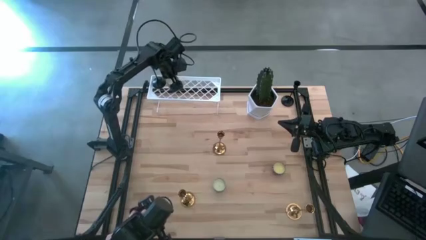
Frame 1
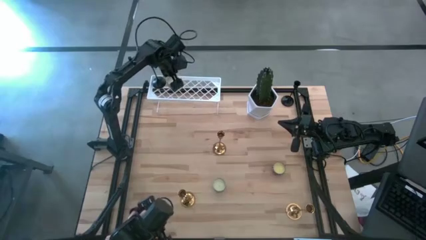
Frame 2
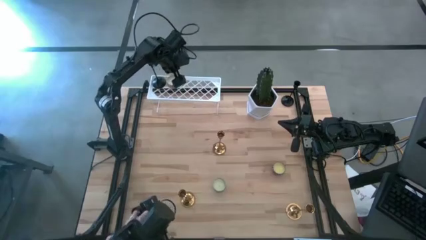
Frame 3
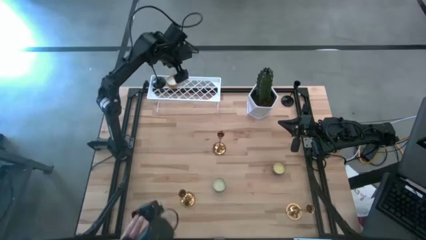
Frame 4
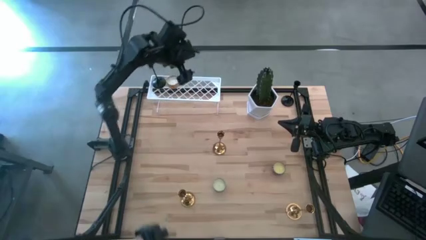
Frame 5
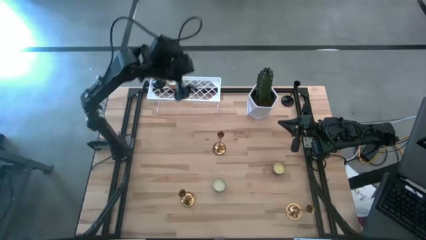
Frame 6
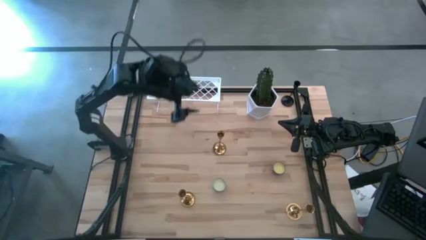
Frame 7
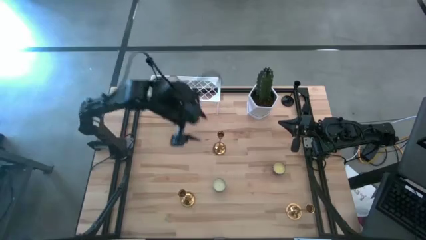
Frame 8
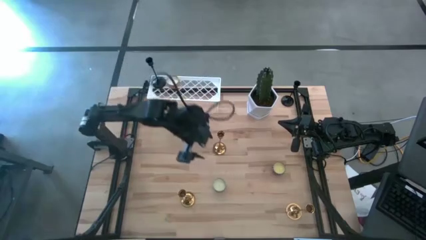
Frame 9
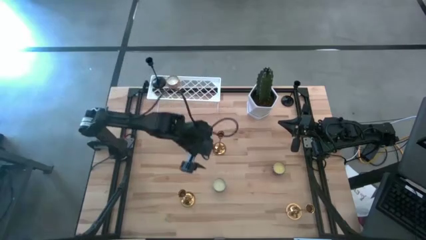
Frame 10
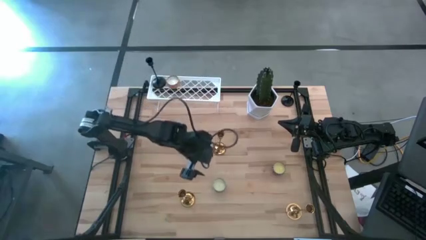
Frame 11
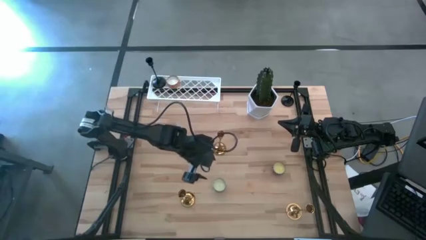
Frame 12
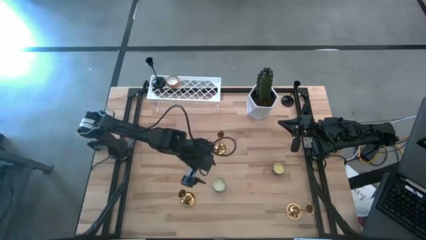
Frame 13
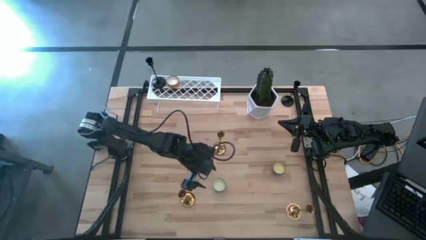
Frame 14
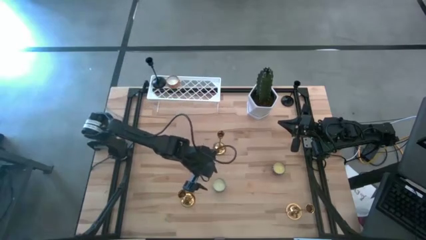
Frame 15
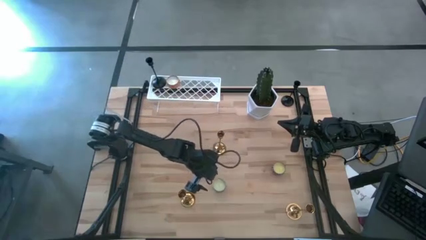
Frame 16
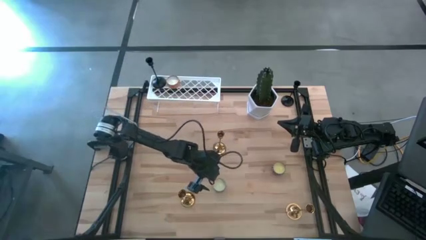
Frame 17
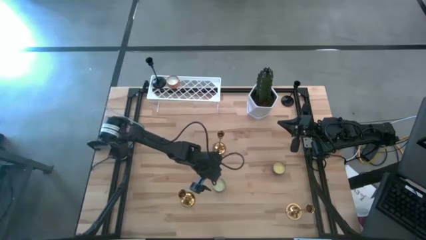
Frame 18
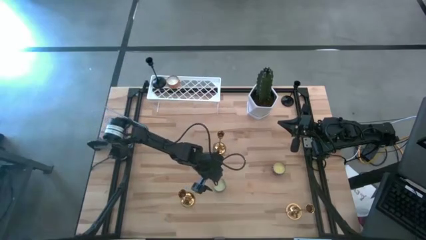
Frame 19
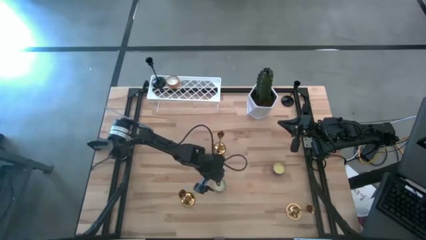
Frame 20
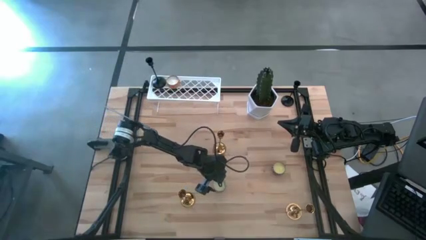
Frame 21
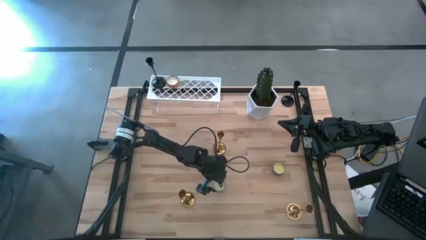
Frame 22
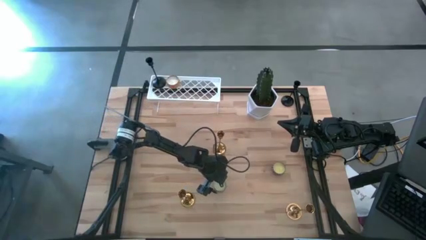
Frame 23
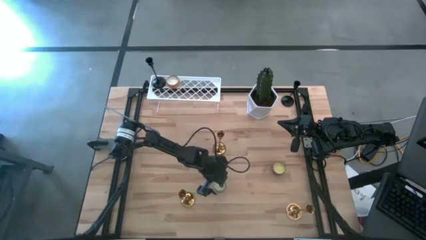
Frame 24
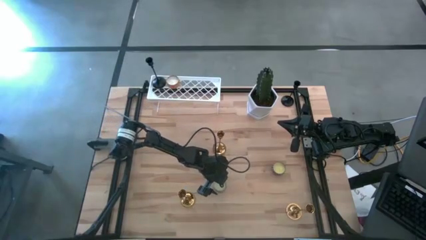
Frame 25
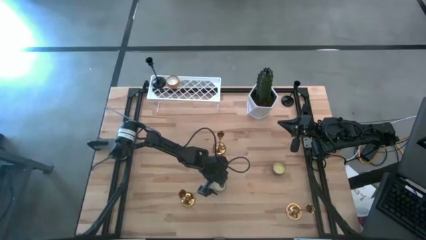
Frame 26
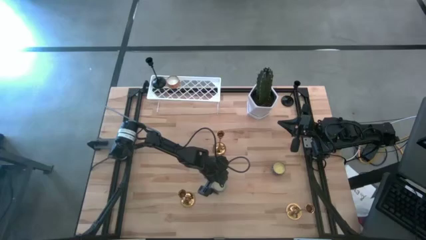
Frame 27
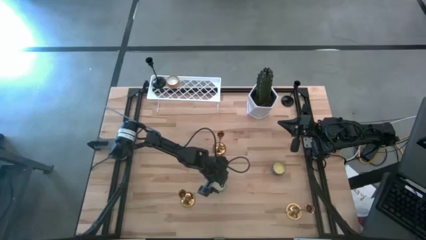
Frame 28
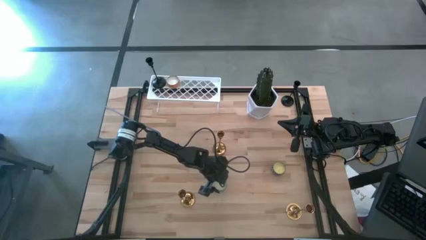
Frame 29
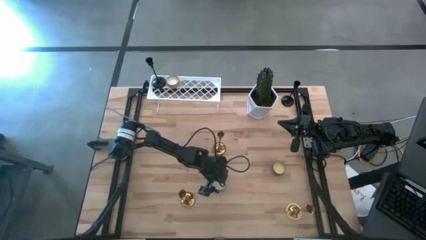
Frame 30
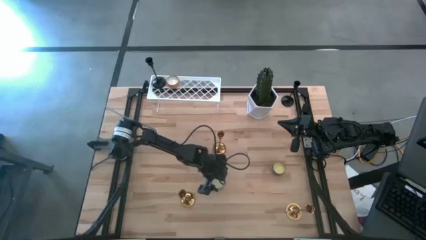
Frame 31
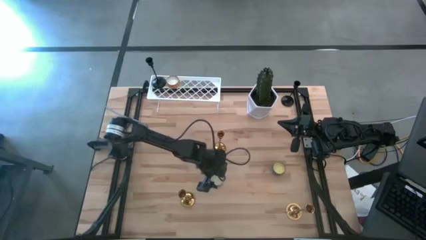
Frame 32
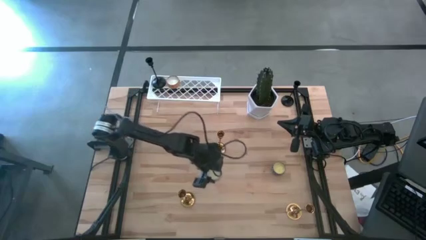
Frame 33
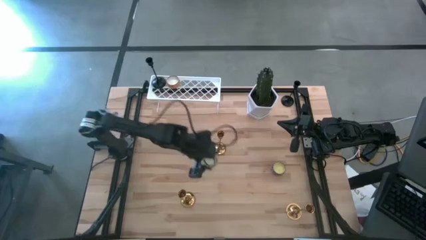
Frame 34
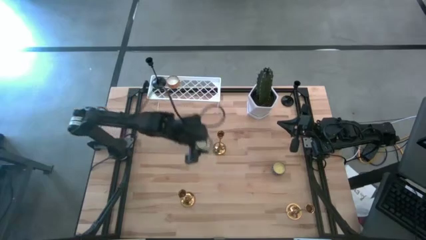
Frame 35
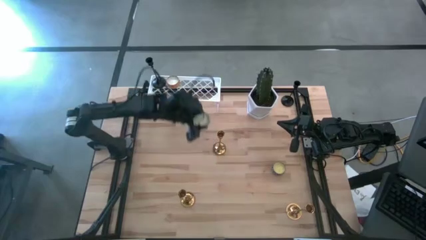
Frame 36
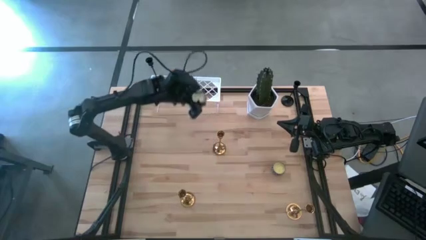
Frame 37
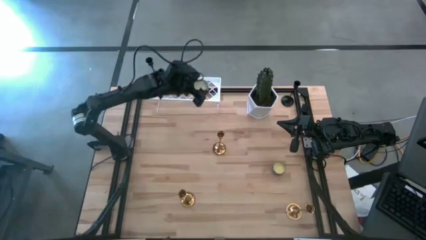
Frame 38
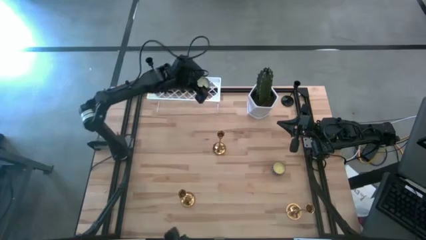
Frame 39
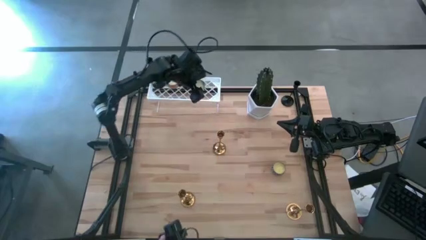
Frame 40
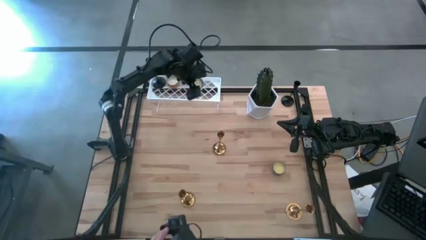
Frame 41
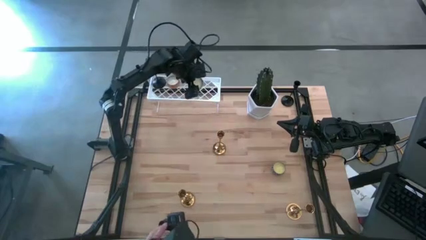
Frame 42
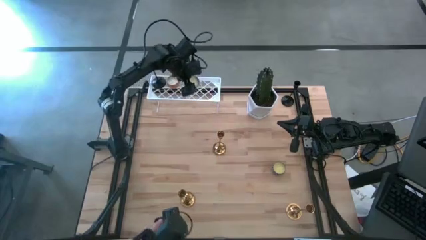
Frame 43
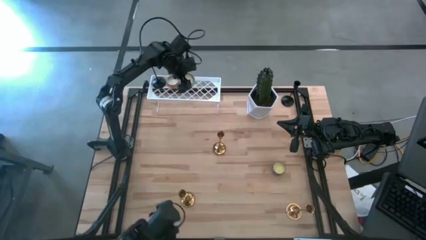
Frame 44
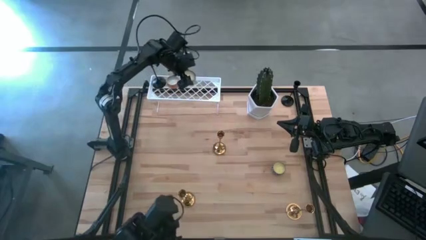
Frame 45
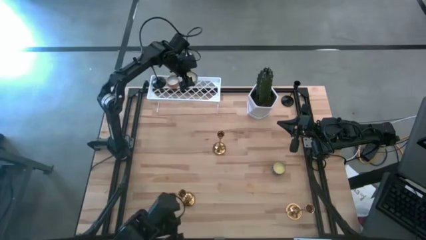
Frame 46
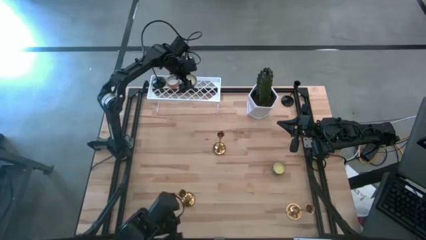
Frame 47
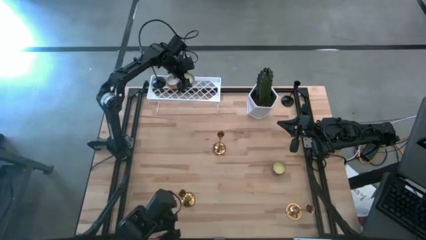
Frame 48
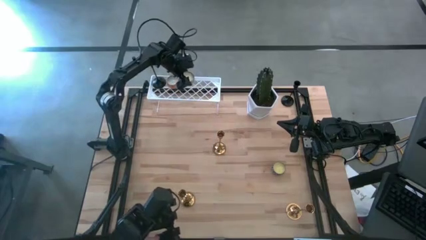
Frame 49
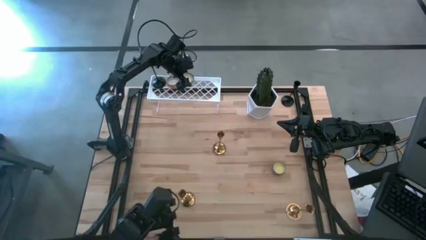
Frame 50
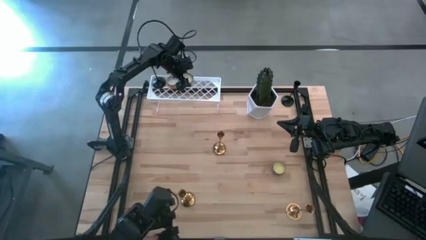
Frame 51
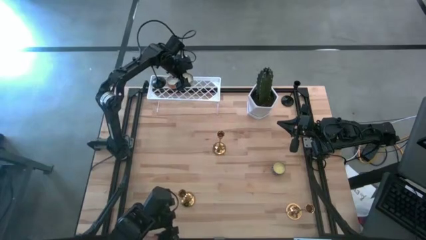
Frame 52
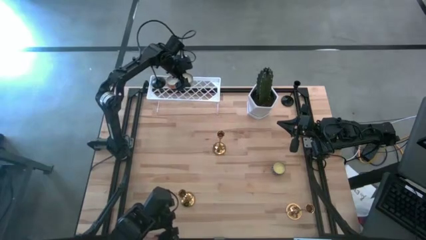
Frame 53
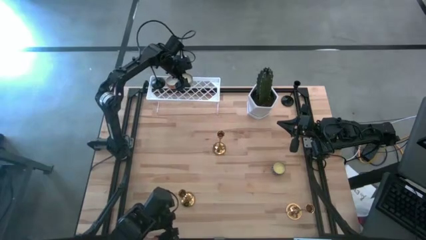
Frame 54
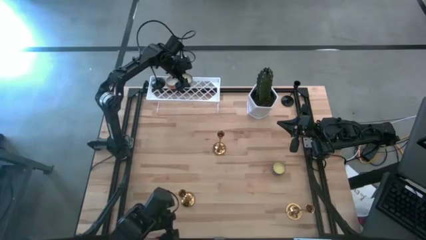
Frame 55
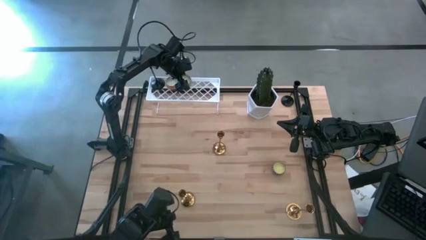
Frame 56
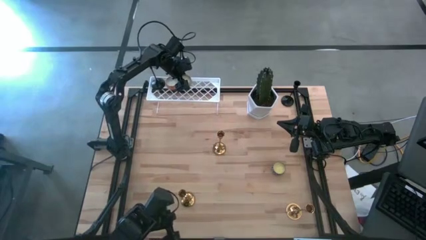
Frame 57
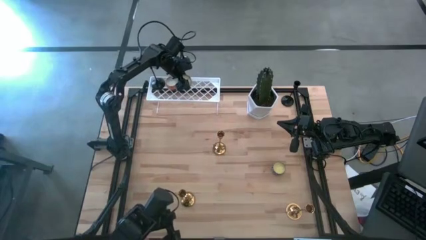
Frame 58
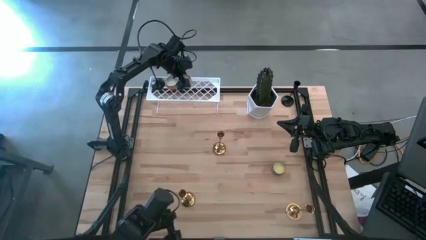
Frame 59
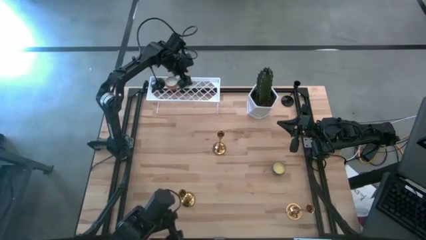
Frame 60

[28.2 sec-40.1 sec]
Task: Pick & Place candle stick holders
Put the blue scented candle on the shelf

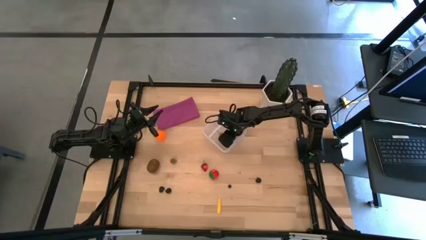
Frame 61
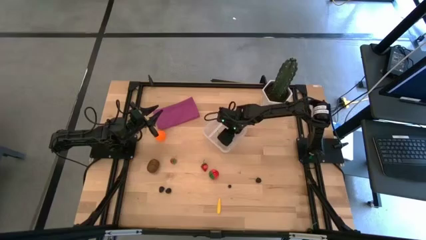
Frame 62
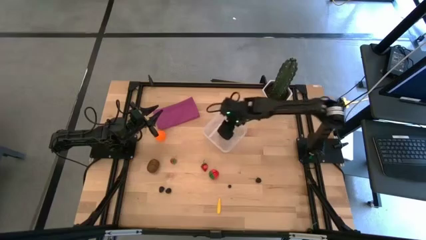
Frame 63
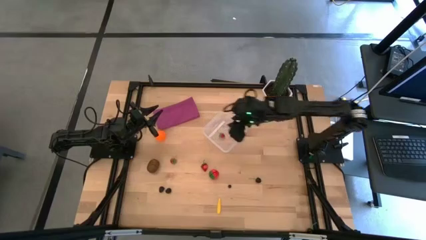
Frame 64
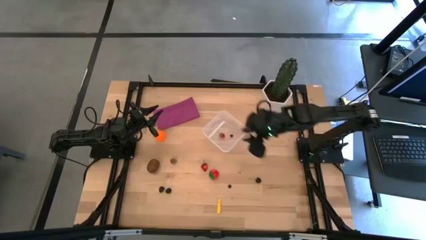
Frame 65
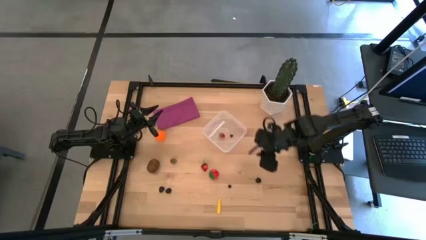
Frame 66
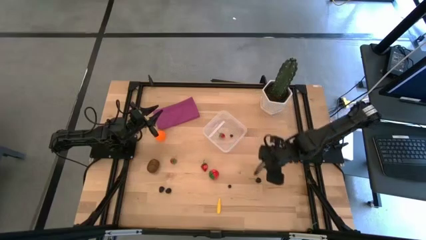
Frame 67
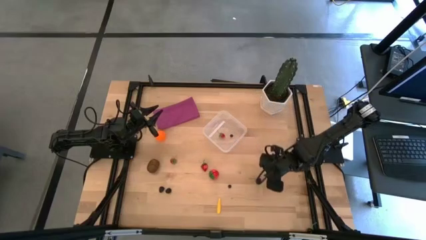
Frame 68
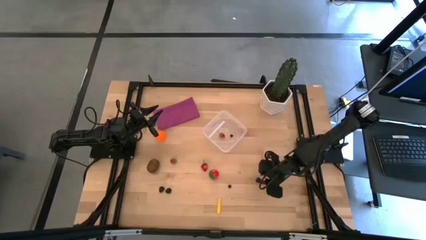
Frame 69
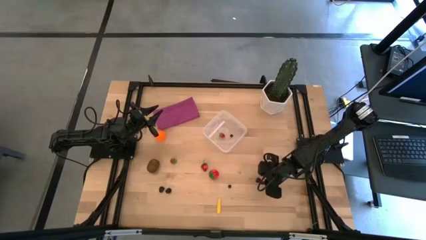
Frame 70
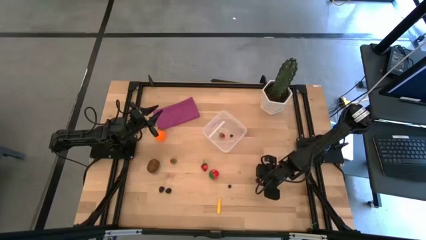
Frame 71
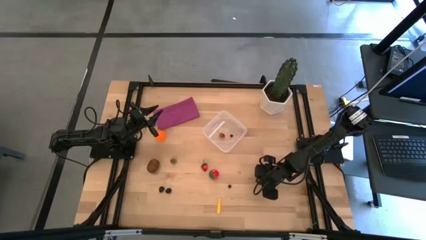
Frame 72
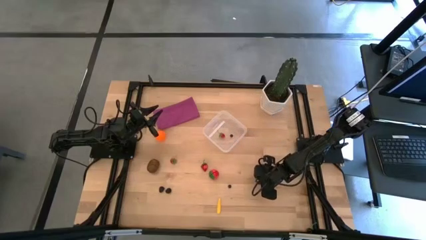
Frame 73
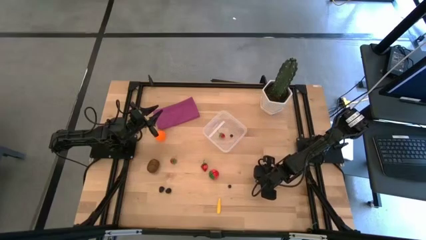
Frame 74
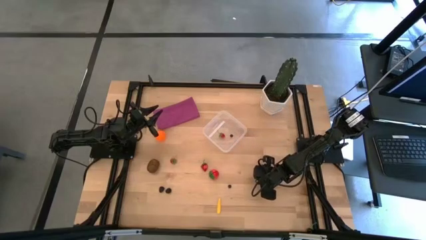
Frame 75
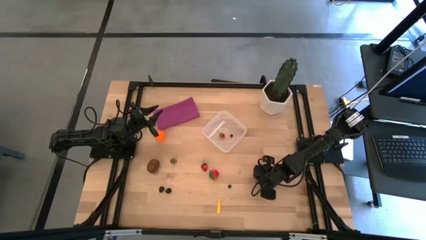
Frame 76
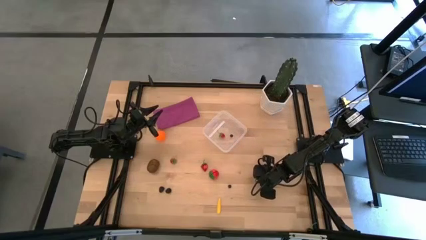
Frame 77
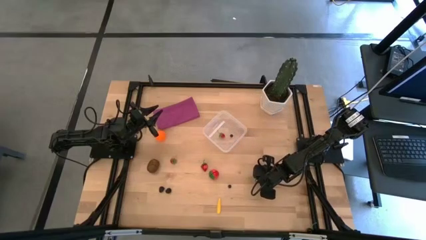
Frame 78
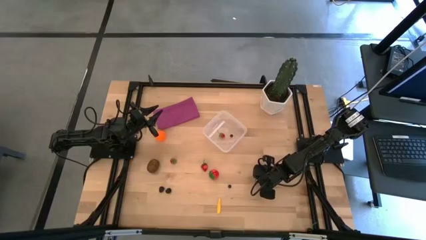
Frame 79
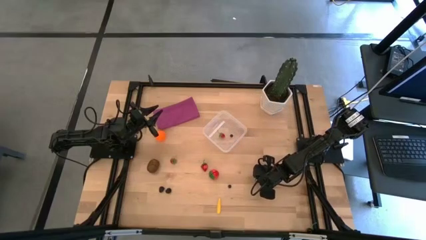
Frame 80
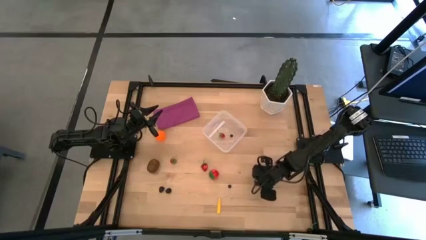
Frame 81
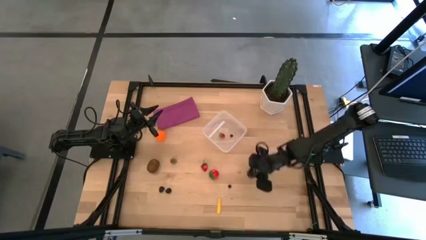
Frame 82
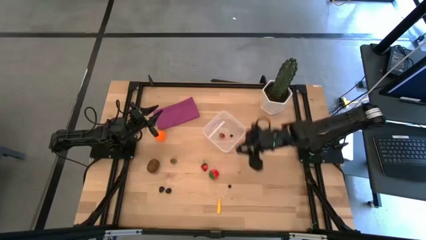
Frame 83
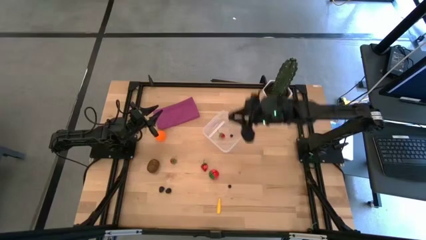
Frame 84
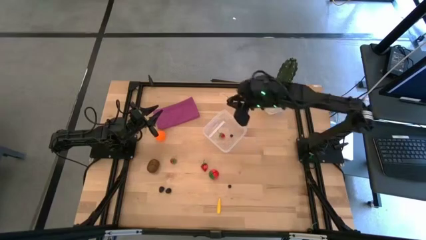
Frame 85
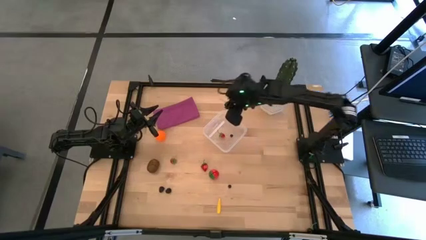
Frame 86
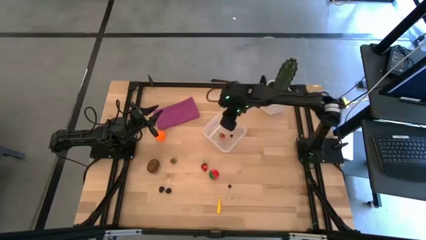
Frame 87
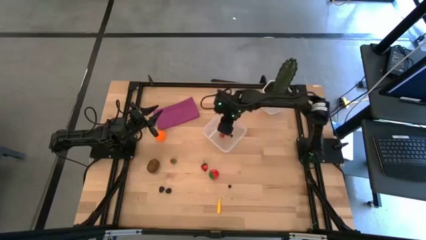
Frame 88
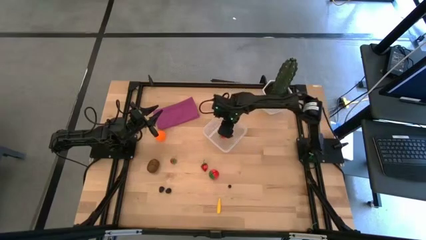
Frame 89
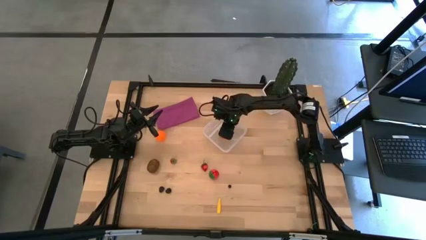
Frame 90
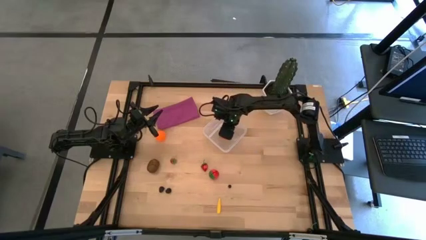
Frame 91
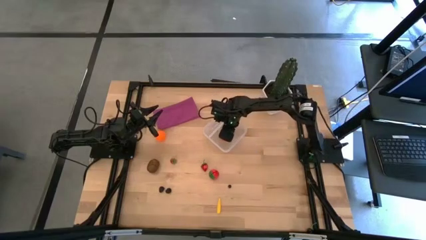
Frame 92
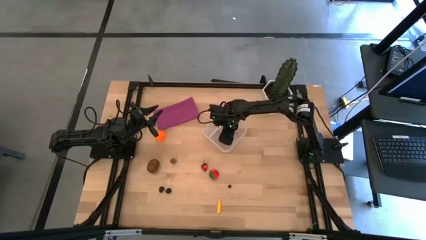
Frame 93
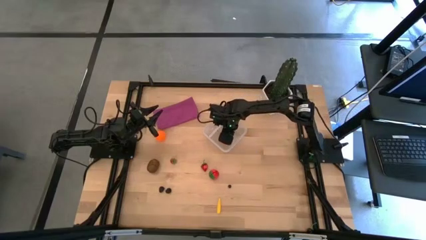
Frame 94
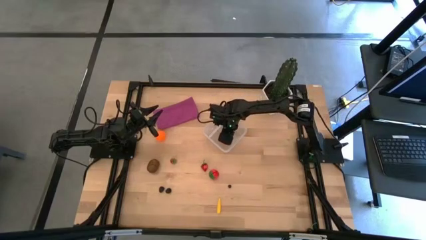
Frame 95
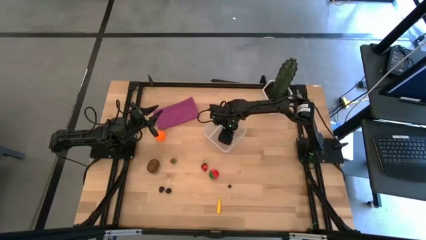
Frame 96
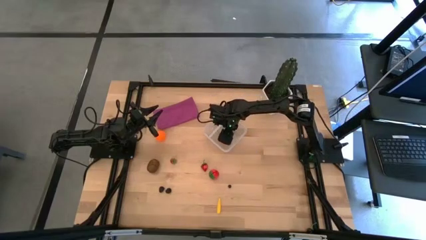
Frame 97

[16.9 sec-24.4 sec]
Task: Pick and placing Produce into tupperware
Put the black cherry into the transparent container
